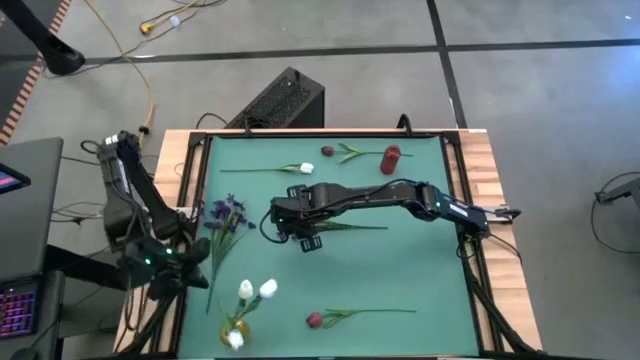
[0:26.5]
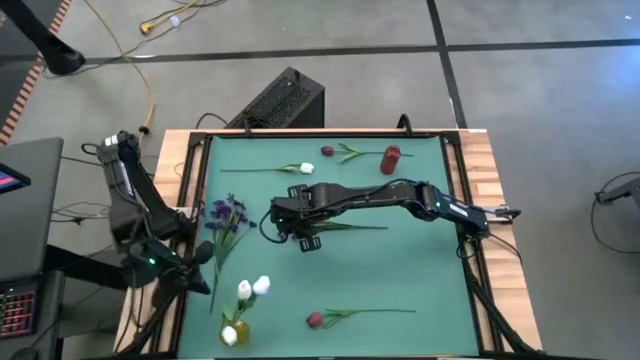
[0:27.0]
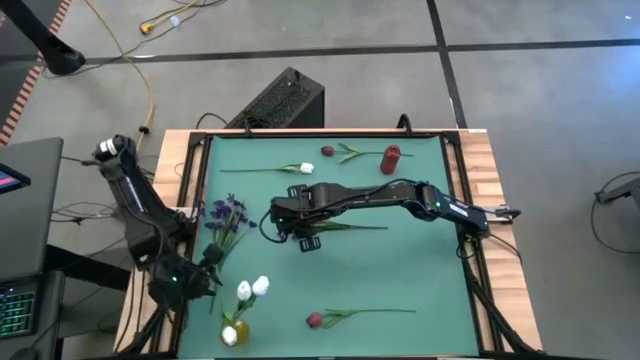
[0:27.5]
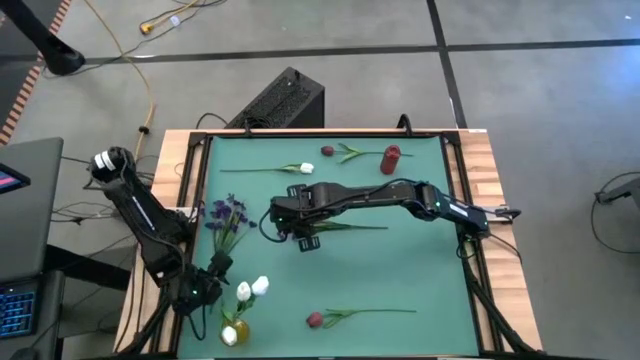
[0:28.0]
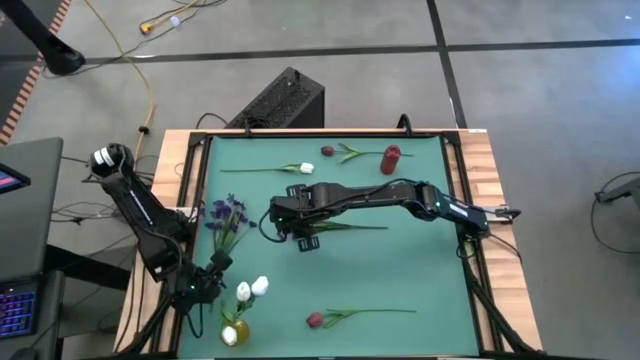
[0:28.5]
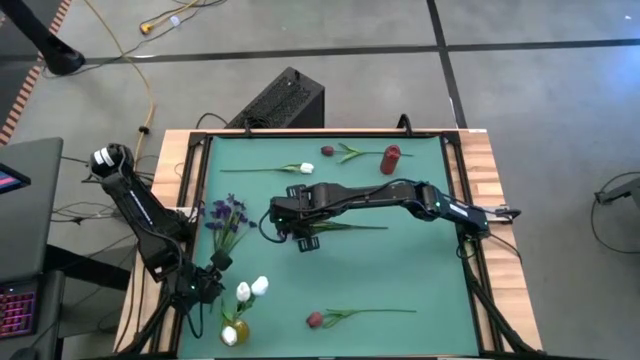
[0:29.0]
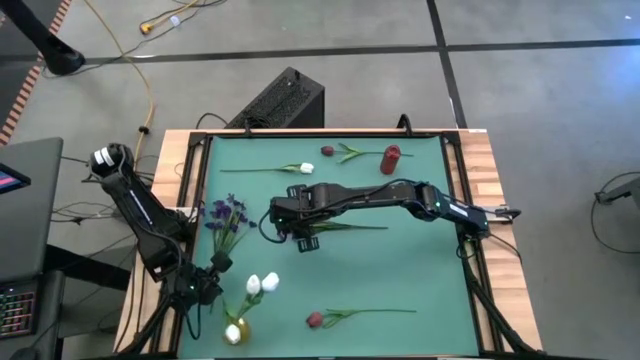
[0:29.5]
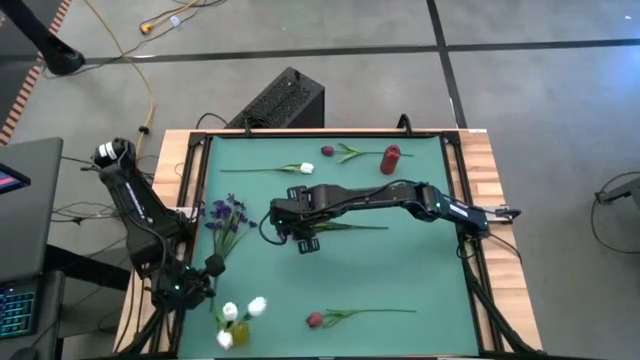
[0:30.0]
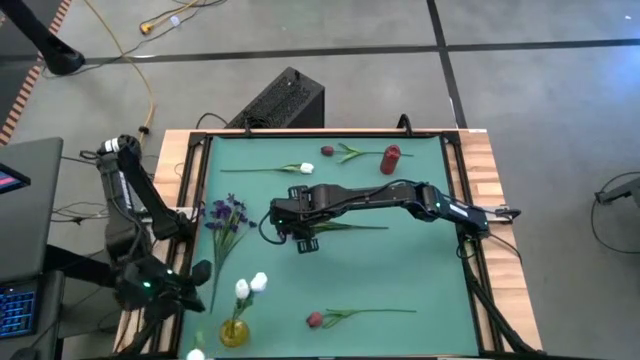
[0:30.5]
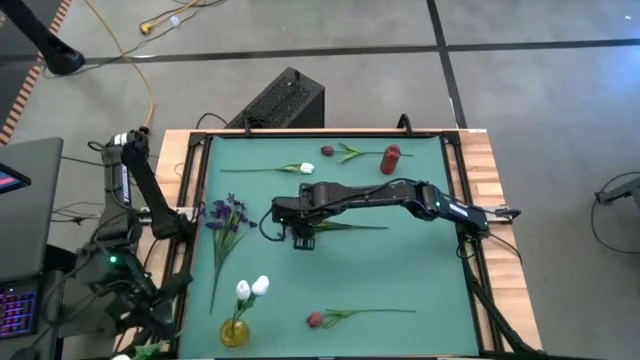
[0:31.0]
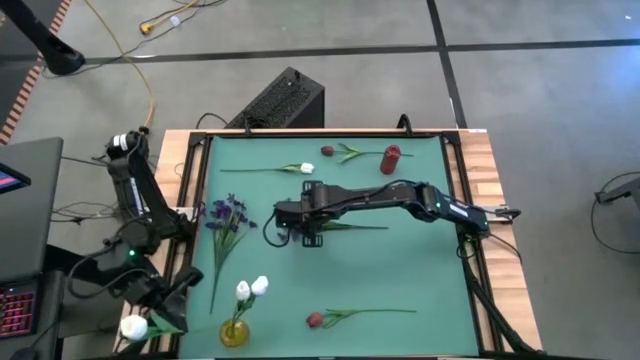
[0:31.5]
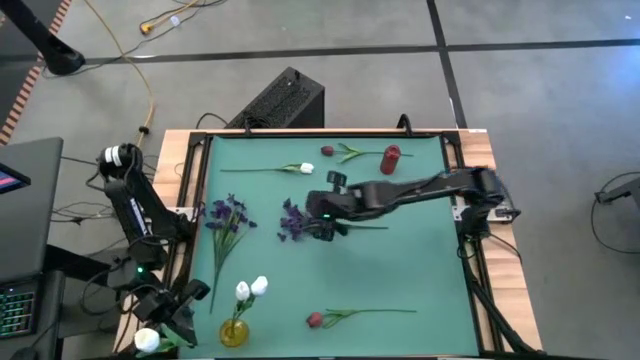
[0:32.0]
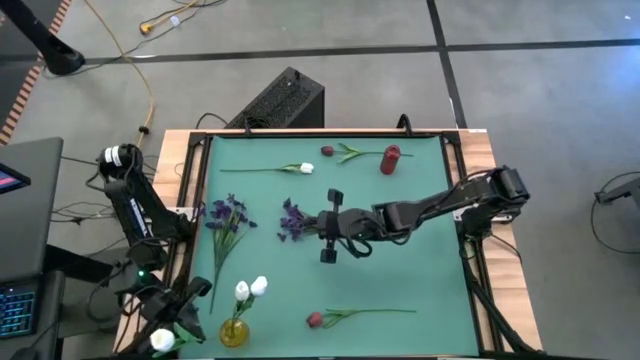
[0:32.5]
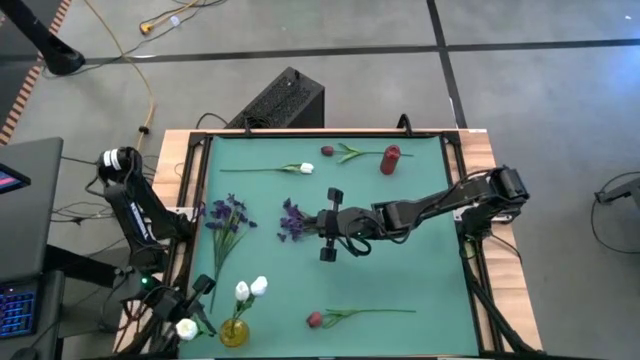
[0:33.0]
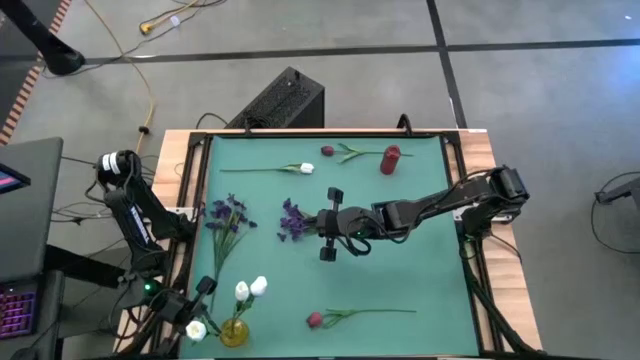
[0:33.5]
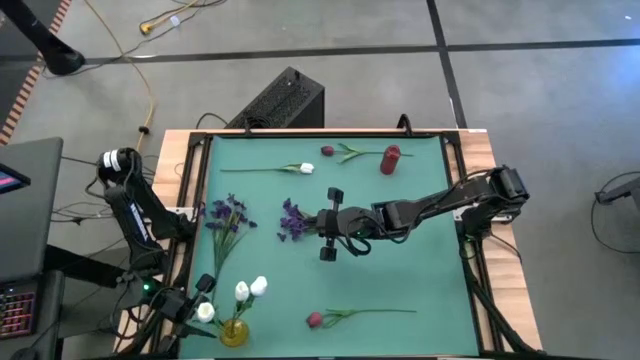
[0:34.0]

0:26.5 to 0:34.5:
Task: Sort flowers into vase by color
Put the white tulip into the yellow vase

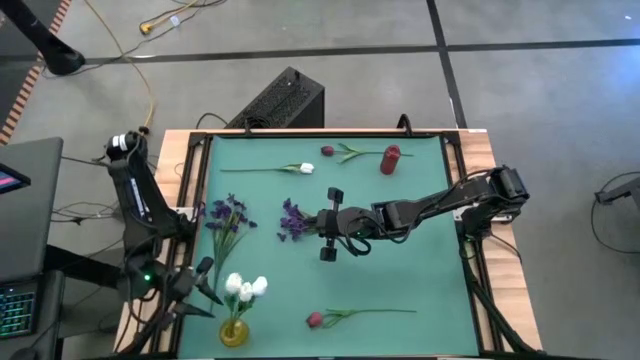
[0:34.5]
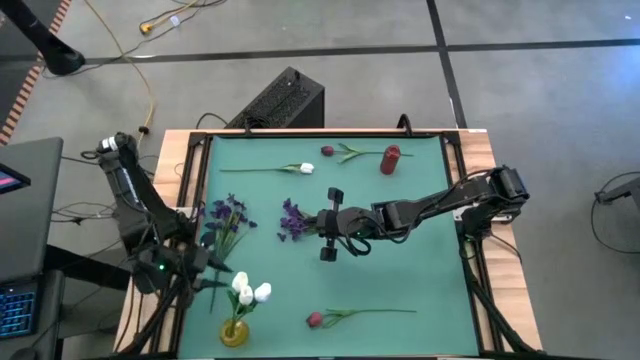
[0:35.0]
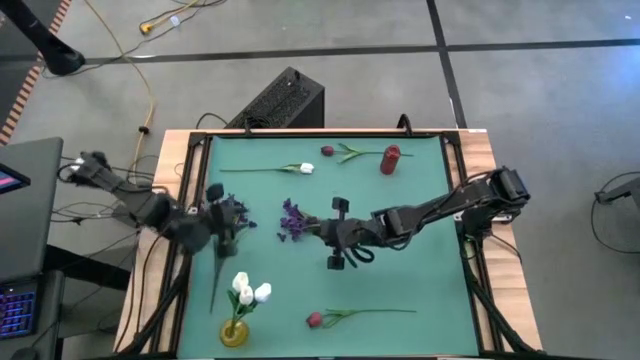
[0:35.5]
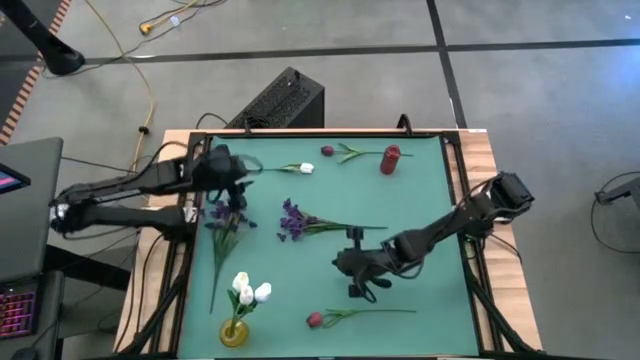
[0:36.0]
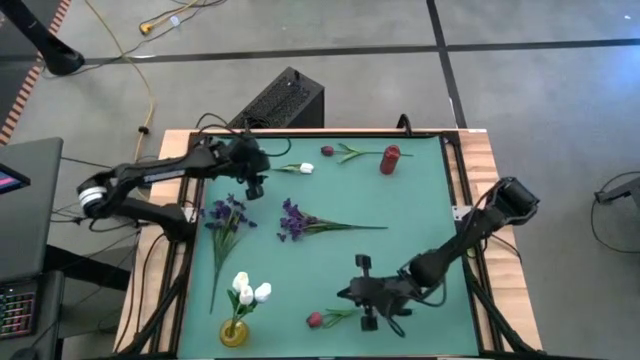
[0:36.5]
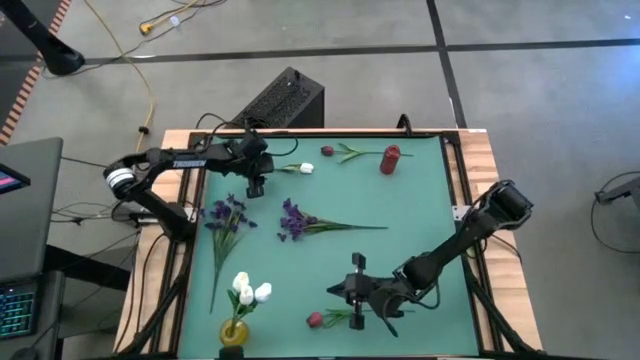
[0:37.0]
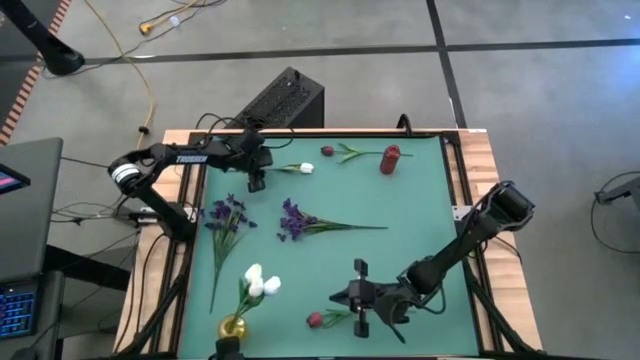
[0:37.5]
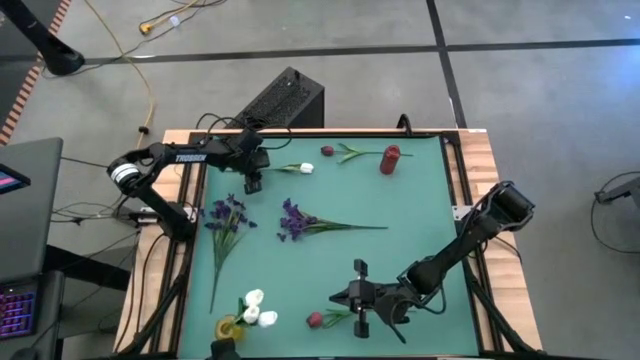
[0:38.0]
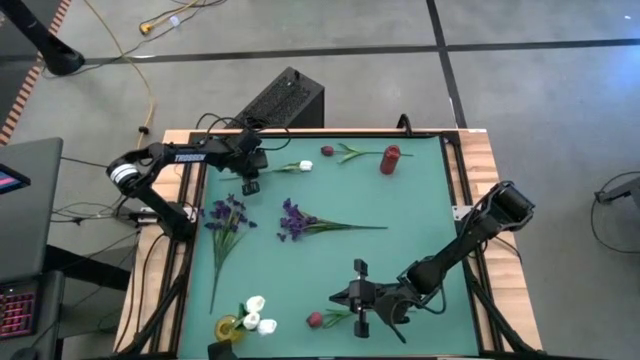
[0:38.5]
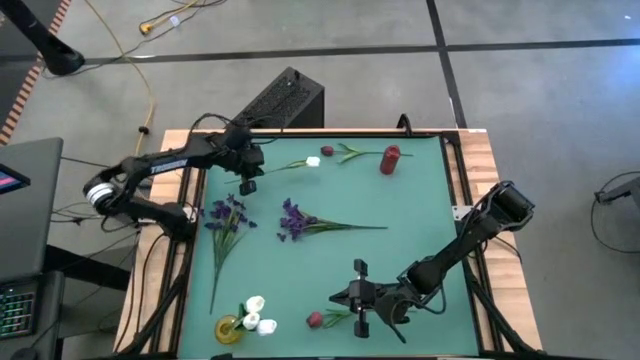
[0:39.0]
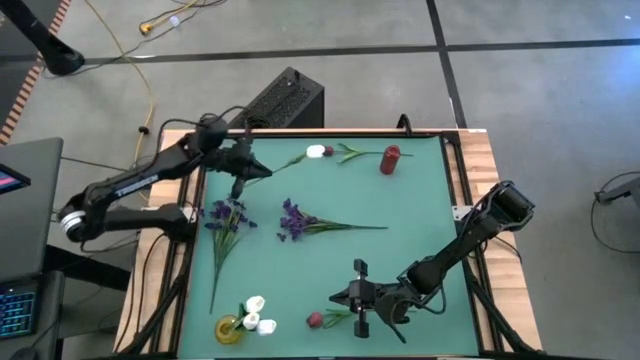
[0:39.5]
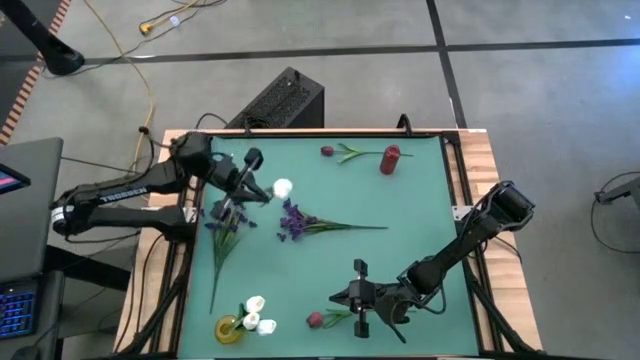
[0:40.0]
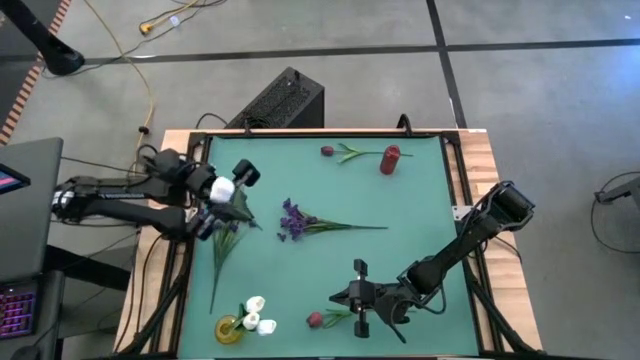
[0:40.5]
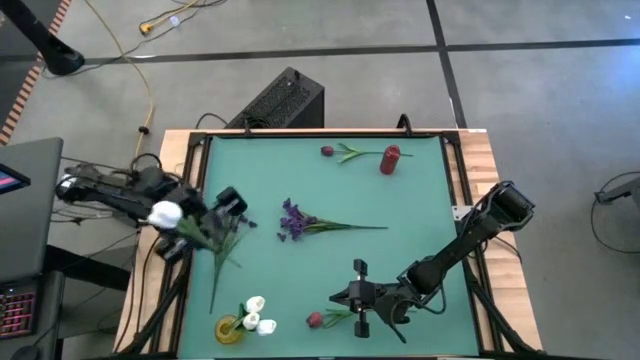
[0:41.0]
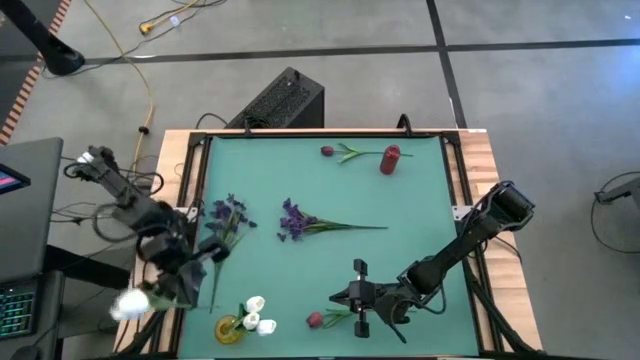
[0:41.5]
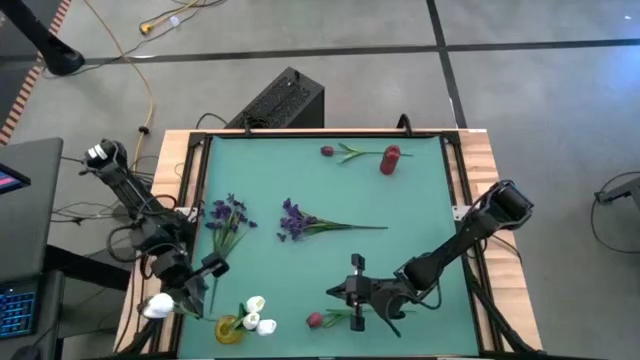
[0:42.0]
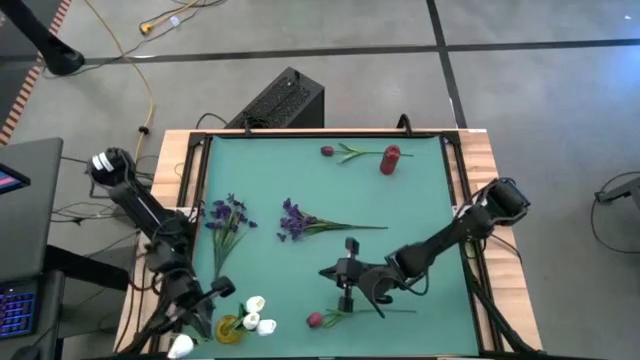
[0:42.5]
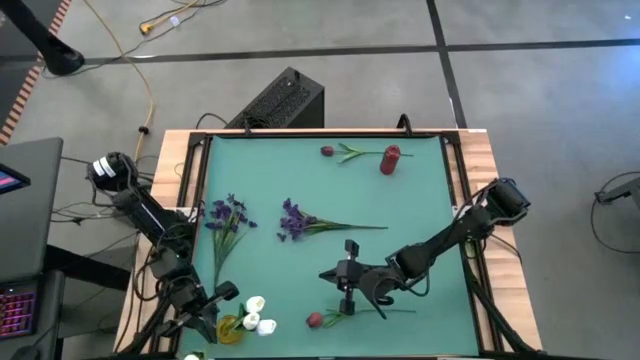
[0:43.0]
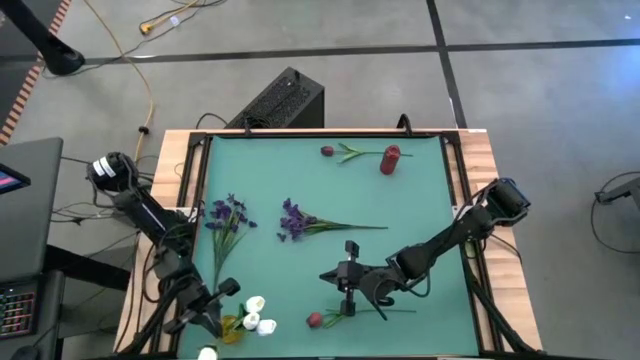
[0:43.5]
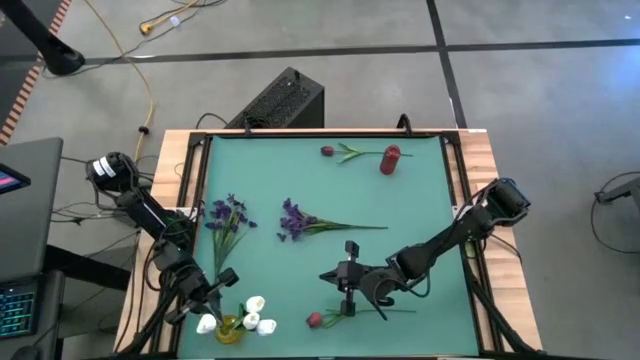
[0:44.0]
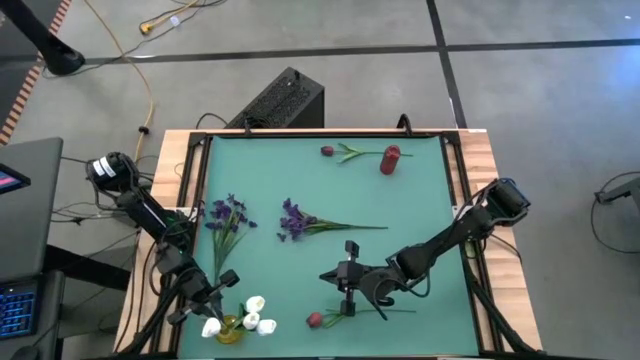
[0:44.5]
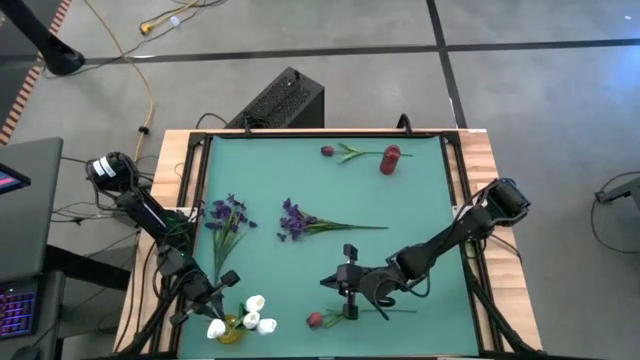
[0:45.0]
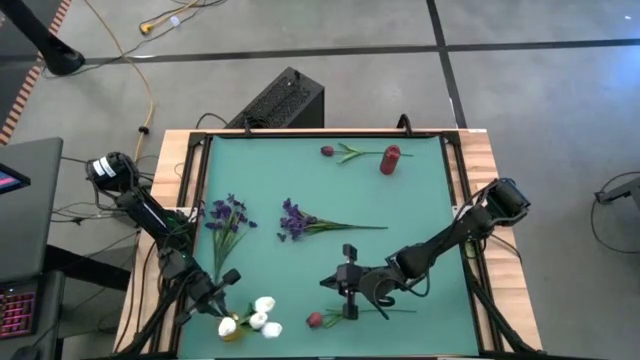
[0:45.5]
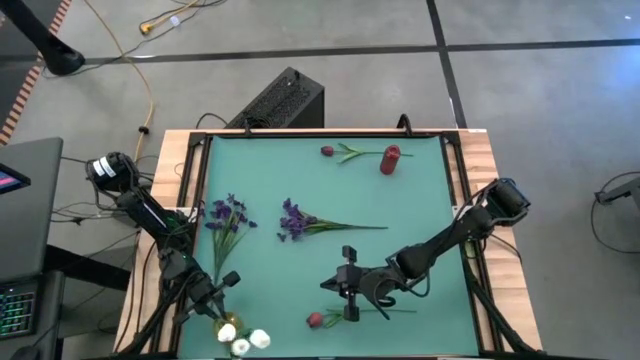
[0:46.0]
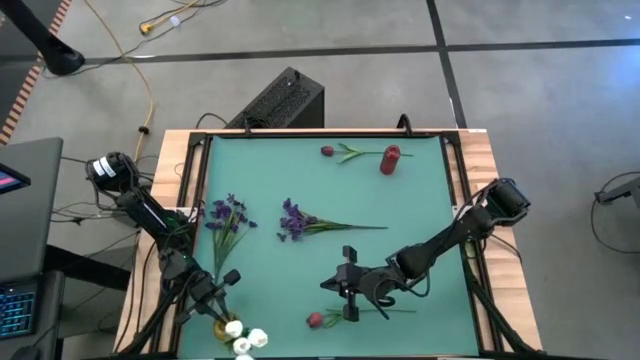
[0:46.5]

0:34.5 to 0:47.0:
Put the white tulip into the yellow vase

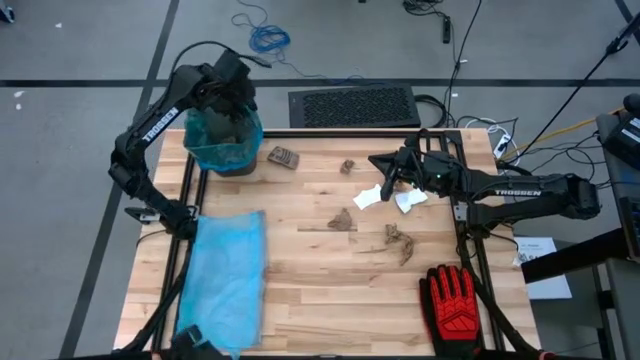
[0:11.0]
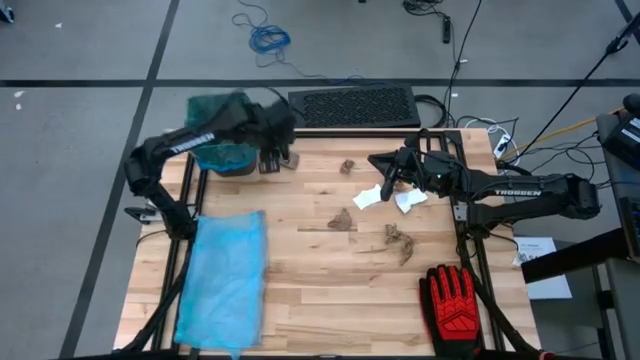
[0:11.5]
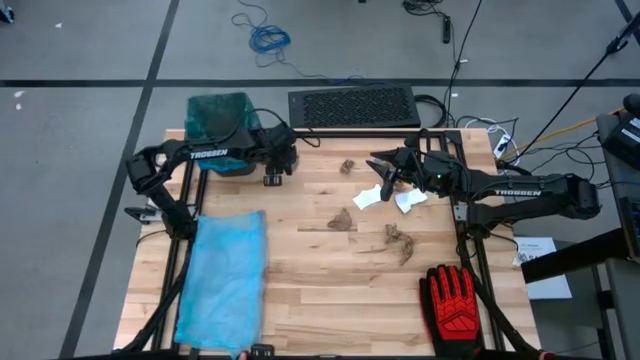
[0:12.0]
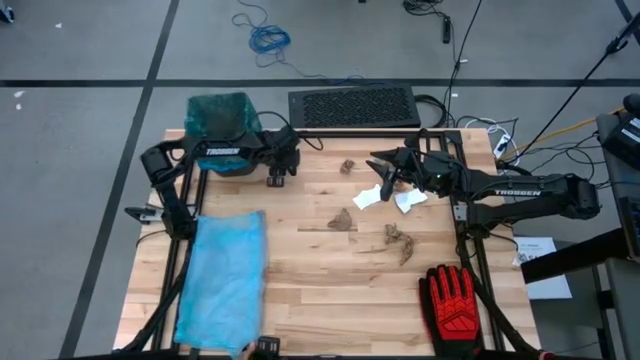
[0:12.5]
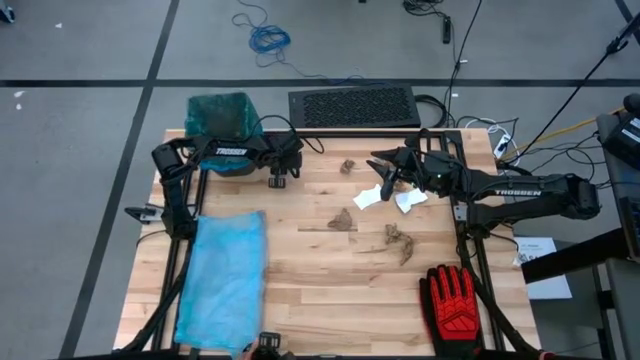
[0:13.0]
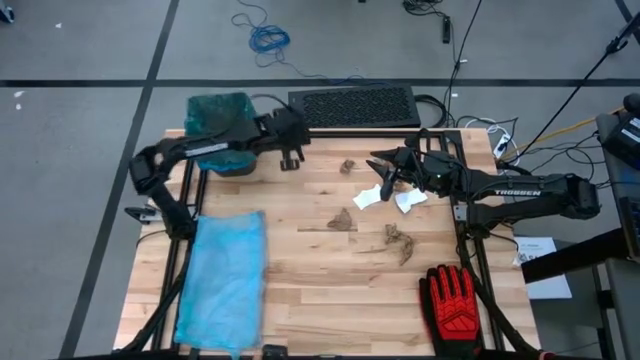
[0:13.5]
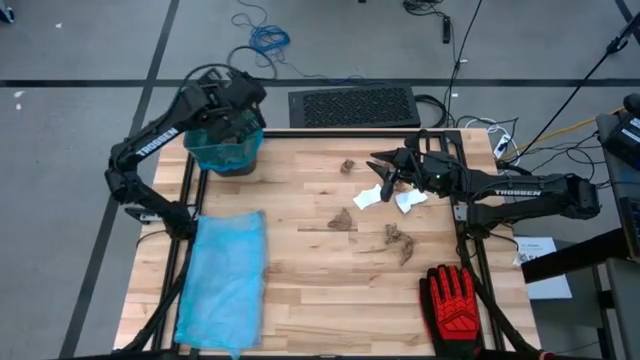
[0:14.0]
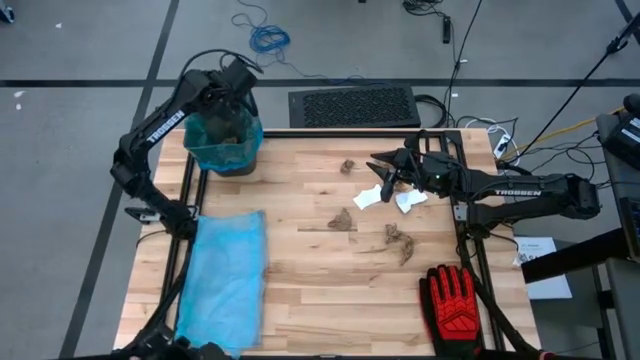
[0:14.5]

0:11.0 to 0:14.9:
Task: place trash/remove bag and relplace
Put the brown coffee sleeve into the black trash bin
